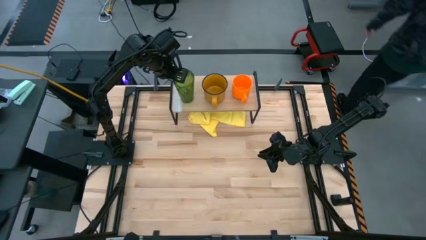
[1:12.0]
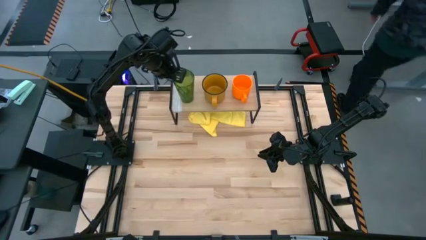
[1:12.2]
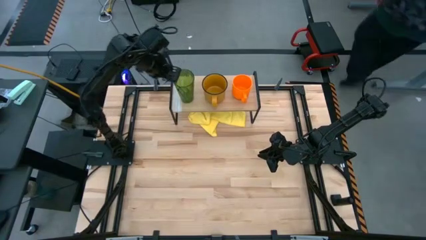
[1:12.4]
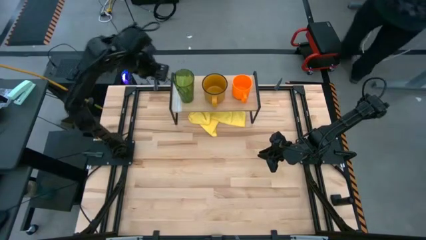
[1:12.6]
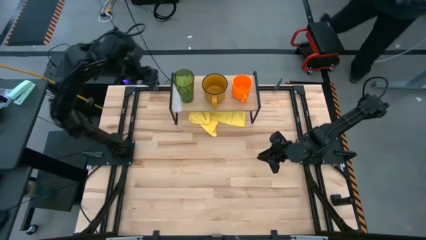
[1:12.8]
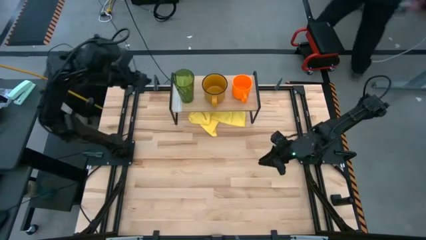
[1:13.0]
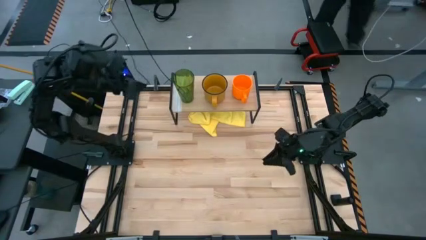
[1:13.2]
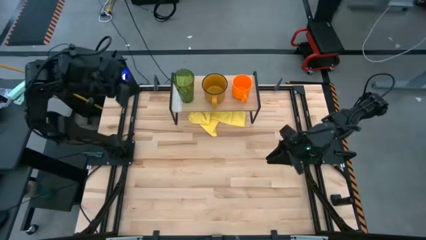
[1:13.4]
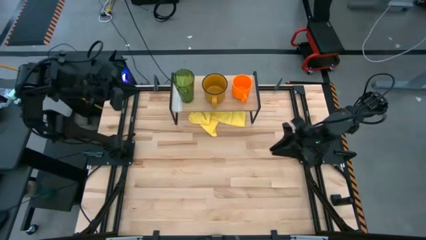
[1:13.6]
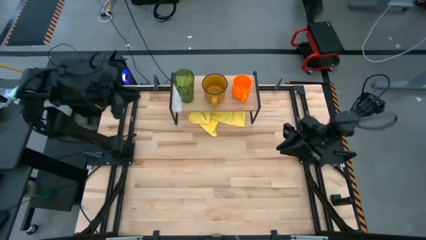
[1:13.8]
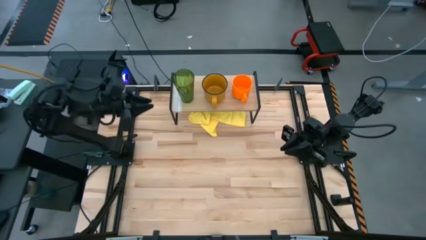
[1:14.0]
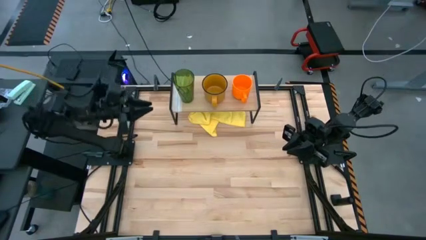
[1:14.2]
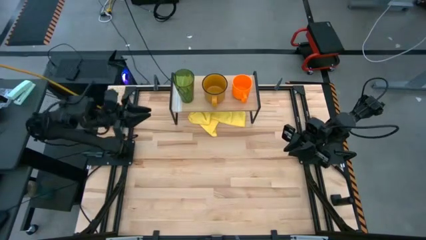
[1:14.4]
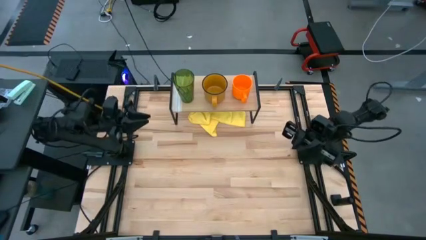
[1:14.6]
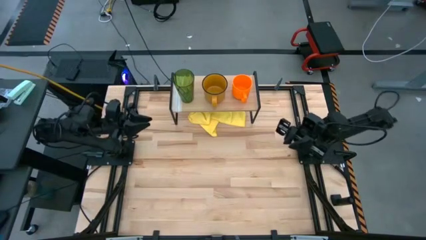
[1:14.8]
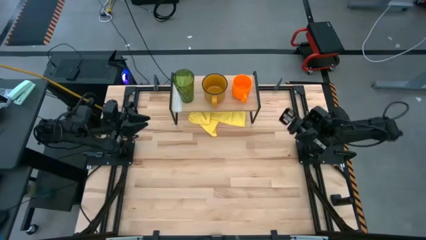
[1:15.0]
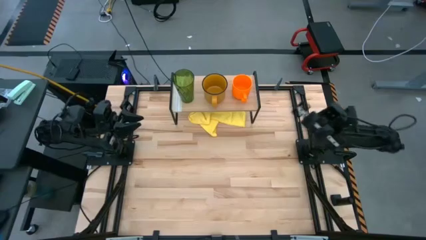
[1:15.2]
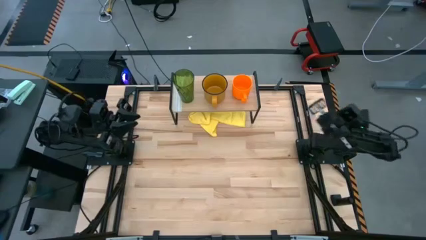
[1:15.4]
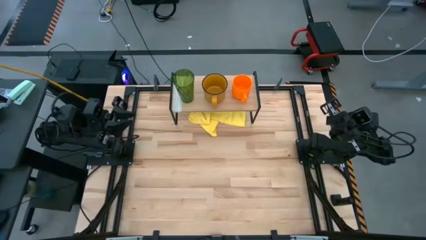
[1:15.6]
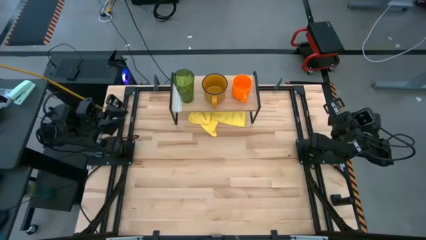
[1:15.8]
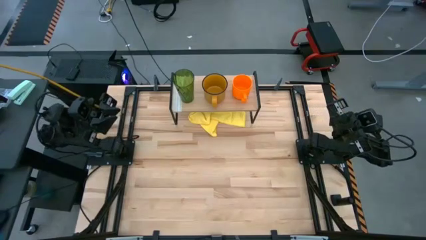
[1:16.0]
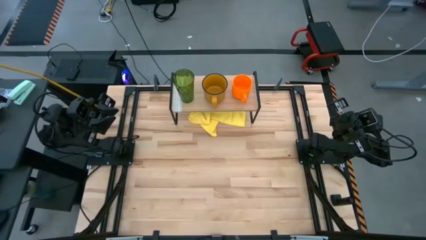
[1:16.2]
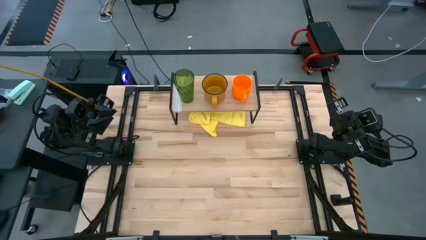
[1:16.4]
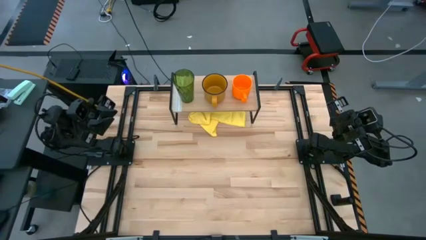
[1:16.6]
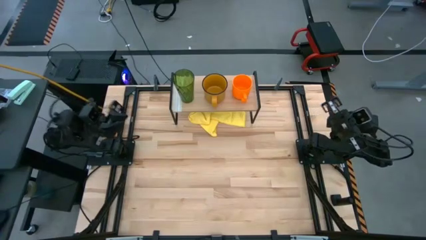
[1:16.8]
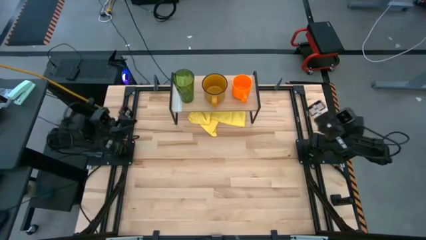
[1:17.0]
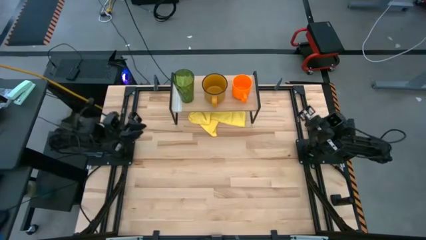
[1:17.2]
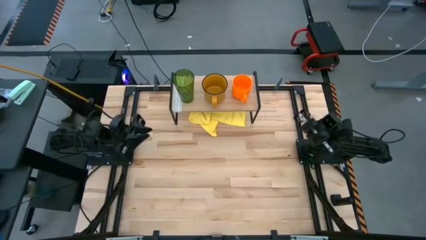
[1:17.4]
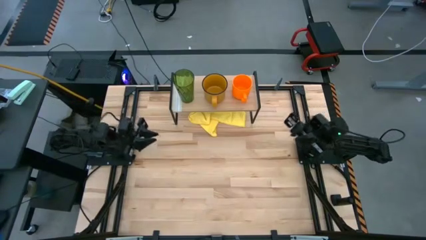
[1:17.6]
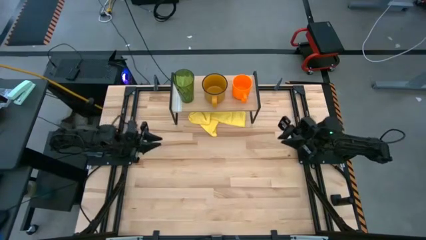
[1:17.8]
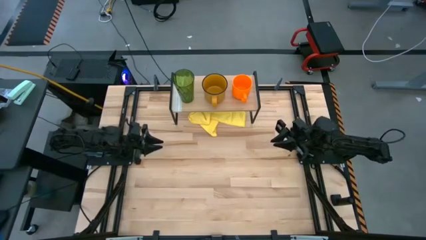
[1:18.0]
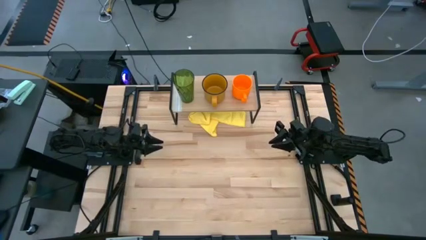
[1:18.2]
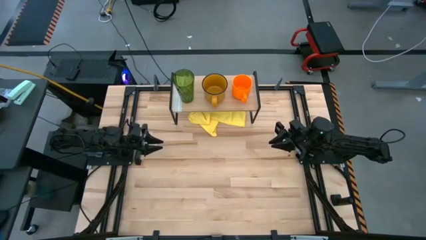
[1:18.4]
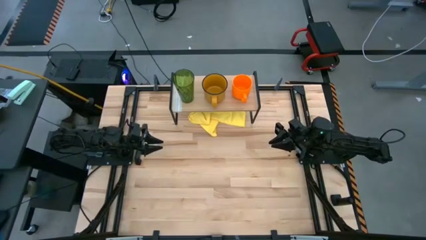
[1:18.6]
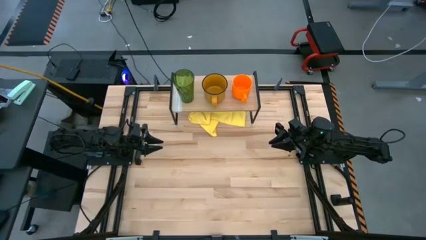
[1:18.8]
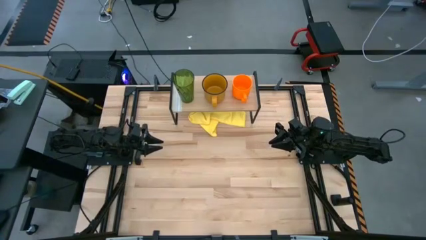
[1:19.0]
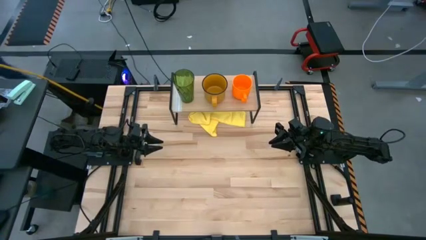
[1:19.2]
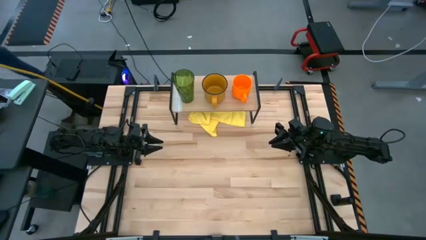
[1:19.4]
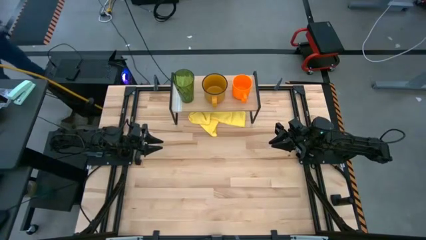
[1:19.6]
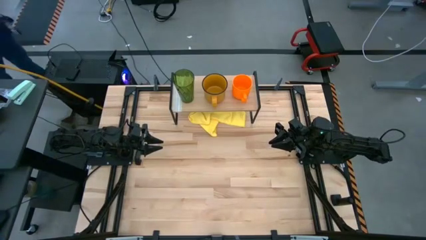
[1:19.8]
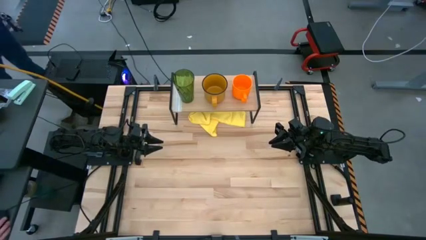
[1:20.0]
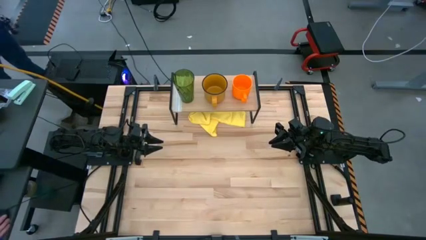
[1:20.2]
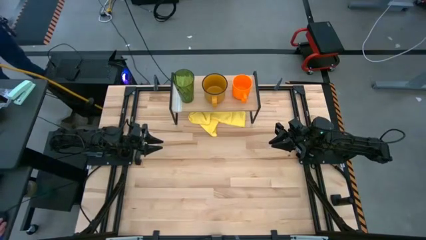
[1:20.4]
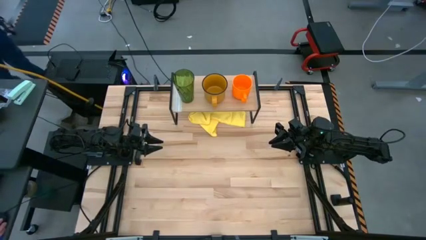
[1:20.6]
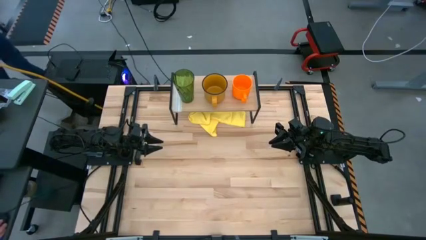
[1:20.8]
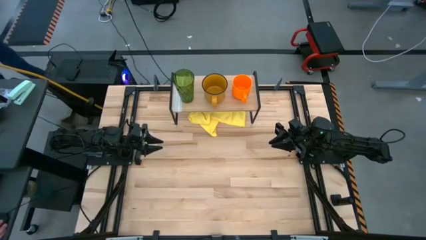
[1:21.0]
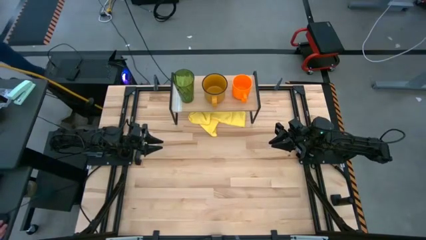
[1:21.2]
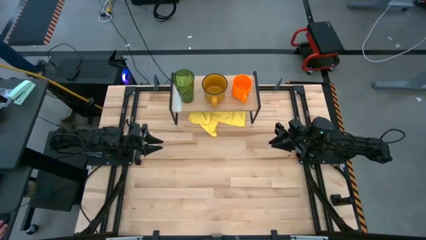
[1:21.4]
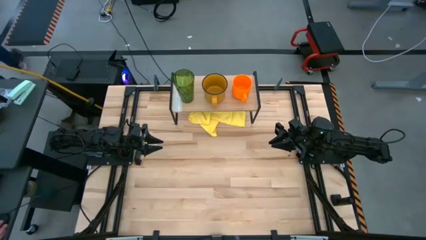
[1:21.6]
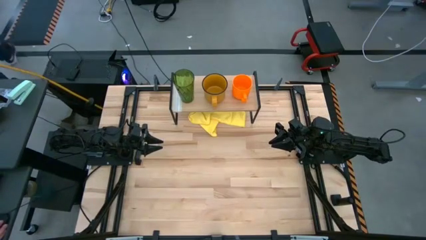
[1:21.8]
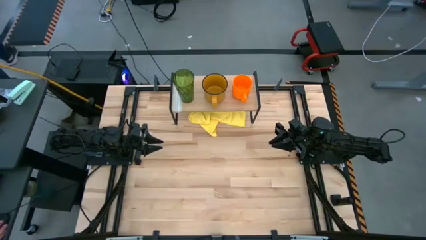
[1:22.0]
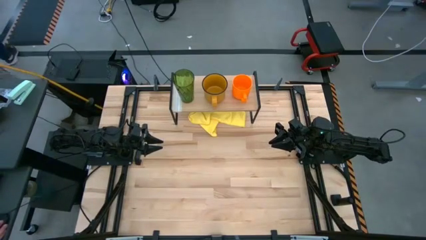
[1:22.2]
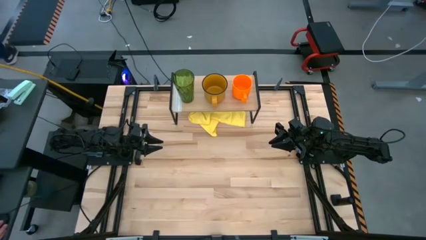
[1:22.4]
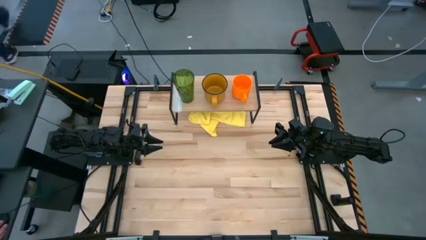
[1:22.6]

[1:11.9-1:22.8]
Task: Stack small to large cups/mugs on shelf
Return to Home Position

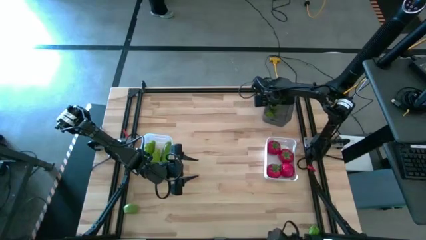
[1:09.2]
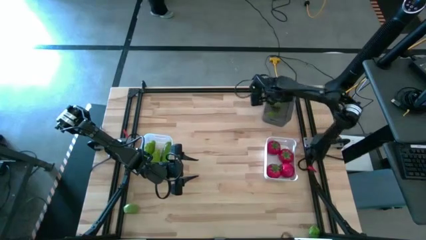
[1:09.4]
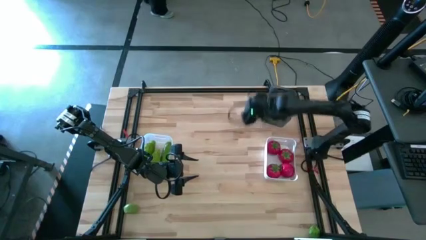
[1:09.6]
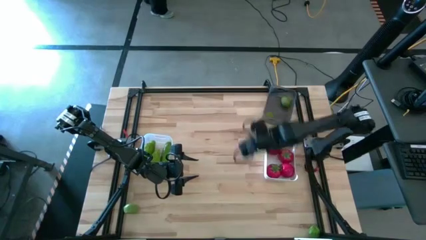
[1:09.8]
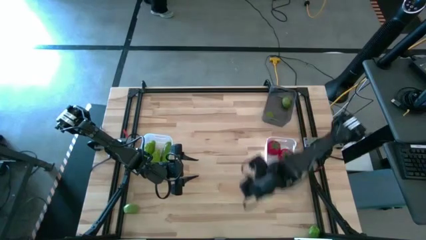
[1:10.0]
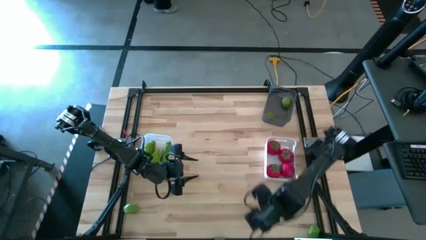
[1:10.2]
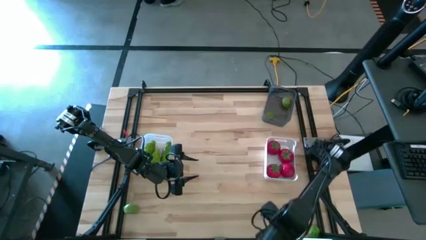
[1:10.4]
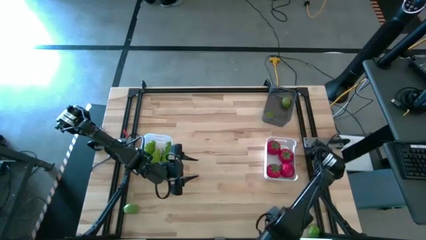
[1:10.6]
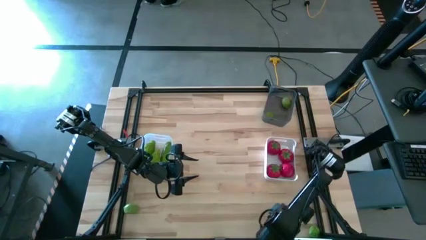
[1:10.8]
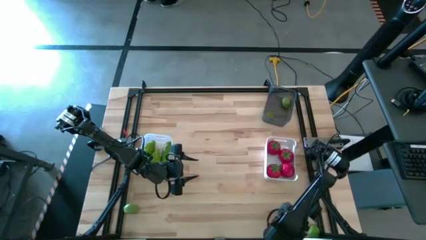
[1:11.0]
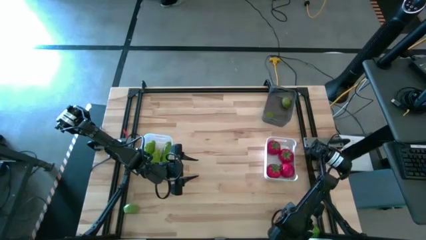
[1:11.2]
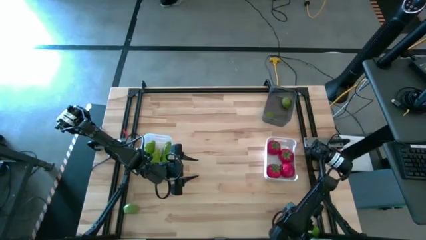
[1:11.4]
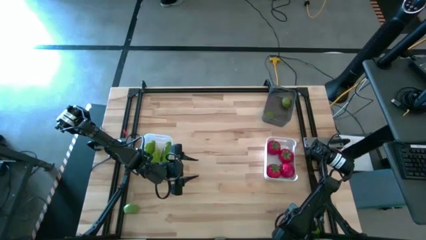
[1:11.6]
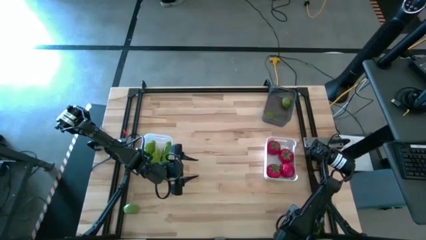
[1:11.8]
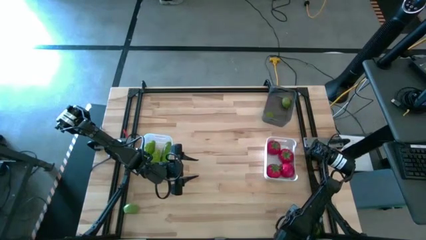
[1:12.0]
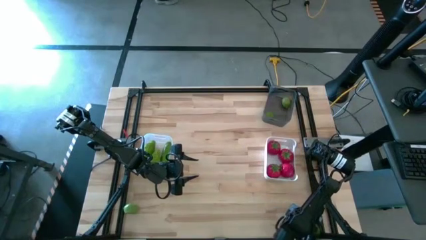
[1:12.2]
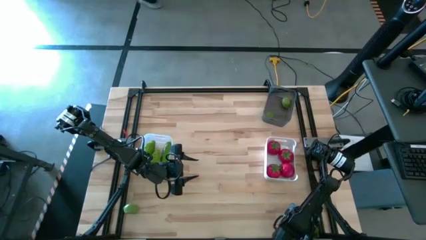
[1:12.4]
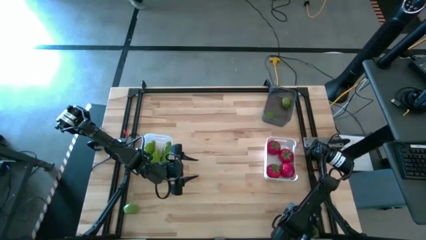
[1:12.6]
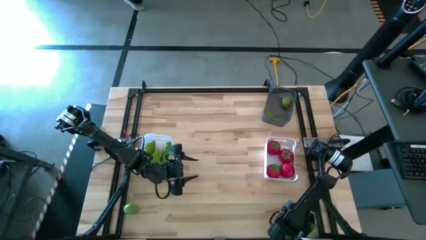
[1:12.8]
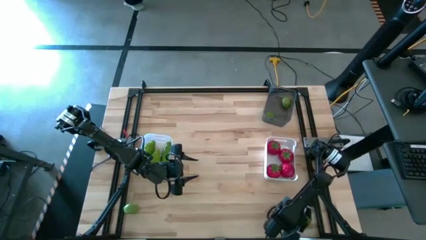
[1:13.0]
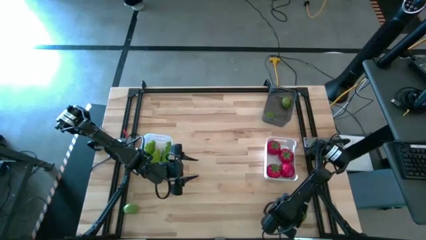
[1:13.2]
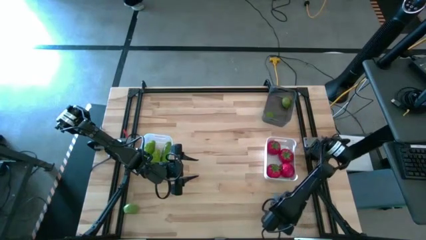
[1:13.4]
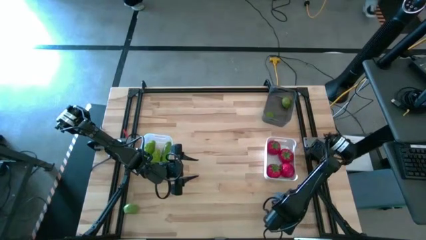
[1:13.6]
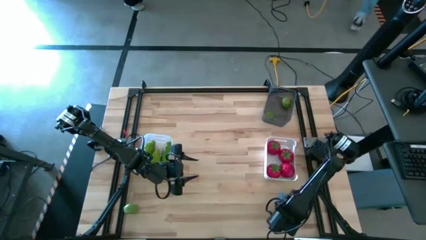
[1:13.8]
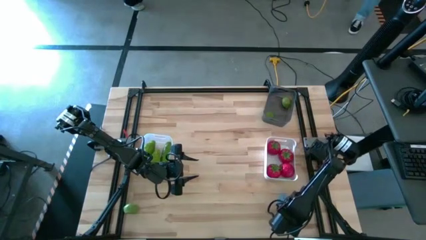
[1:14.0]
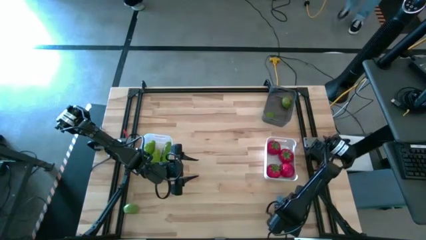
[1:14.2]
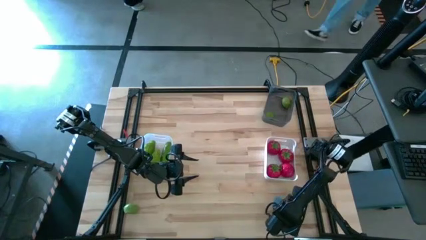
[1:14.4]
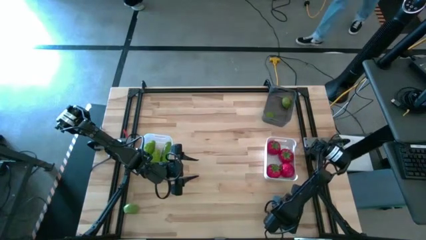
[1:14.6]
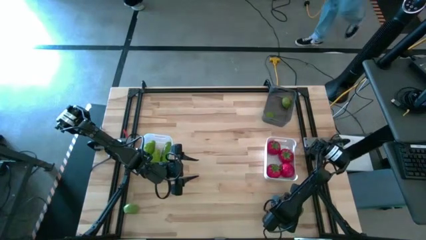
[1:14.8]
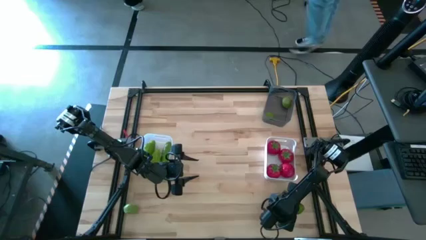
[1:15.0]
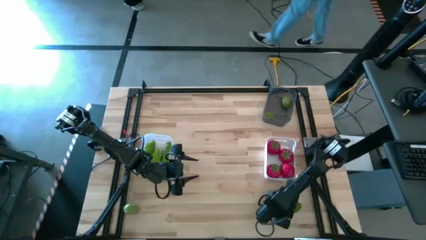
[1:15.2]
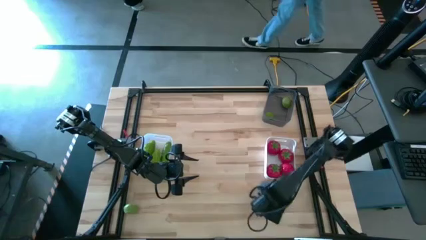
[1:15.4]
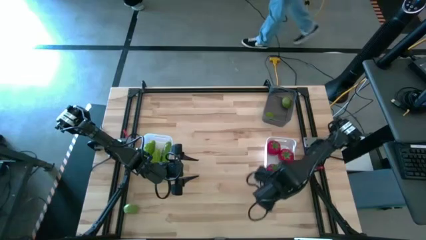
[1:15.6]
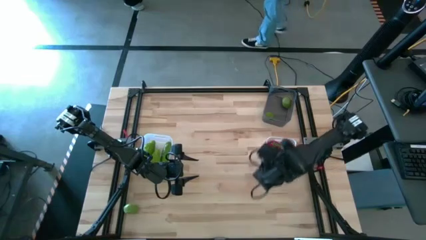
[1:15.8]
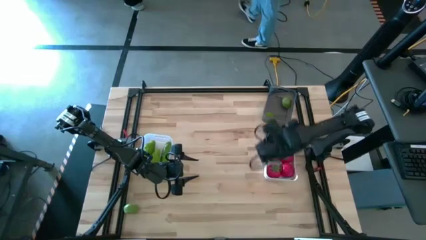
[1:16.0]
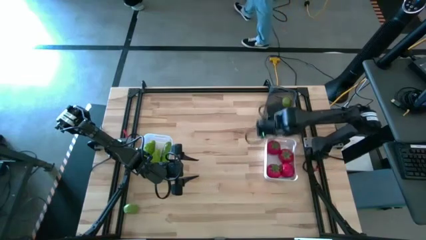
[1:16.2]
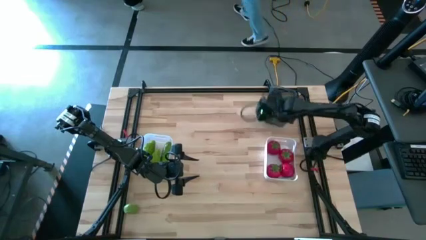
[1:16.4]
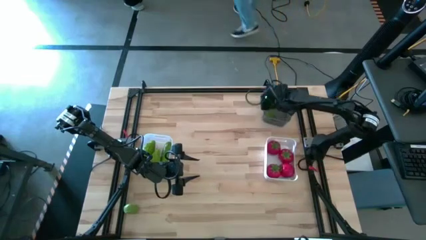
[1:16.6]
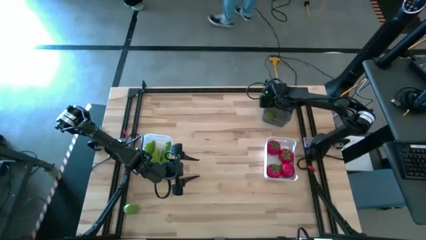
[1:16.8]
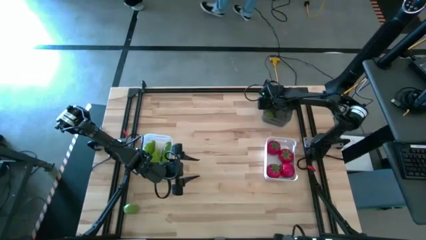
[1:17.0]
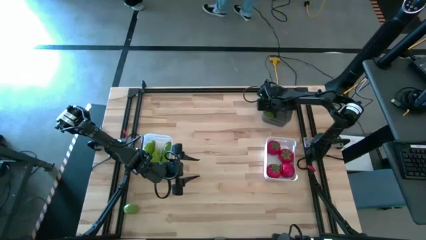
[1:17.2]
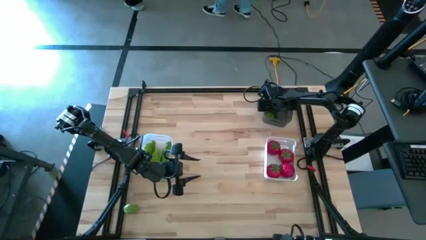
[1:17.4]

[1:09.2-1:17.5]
Task: Sort produce into baskets
Put the lime into the black bin
